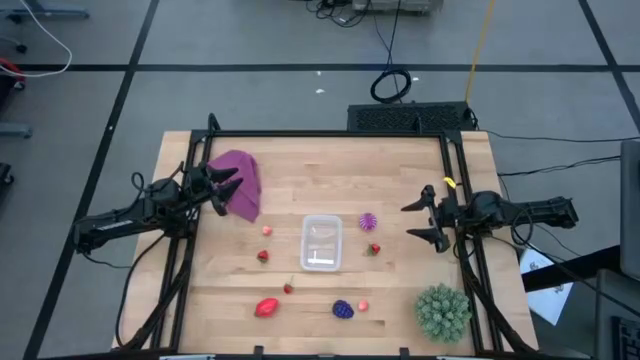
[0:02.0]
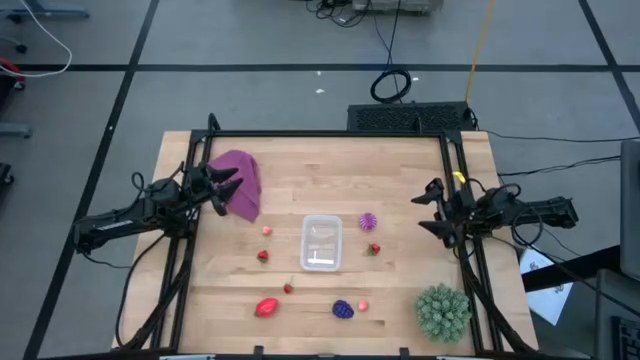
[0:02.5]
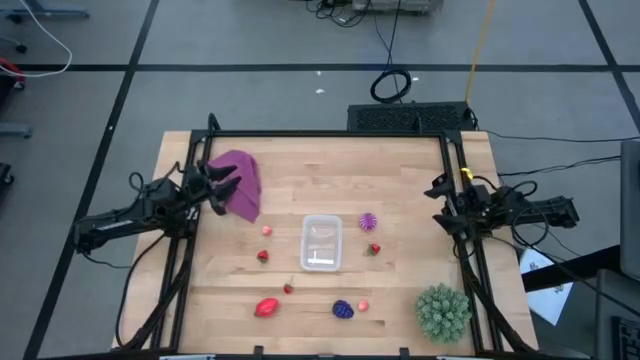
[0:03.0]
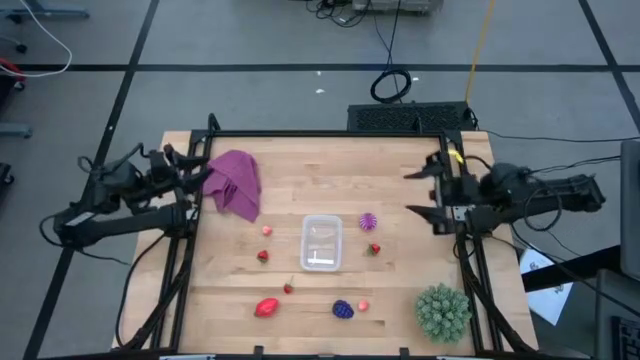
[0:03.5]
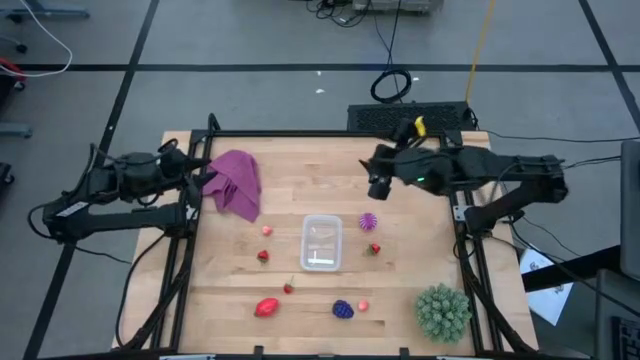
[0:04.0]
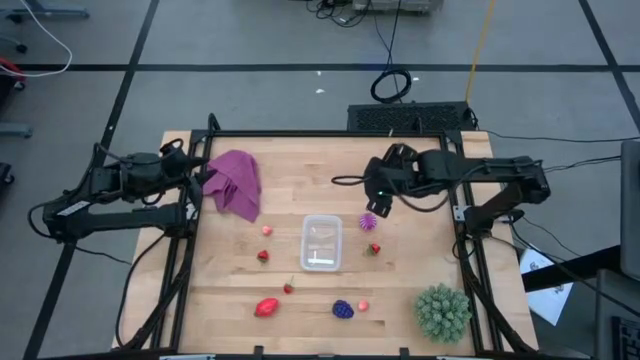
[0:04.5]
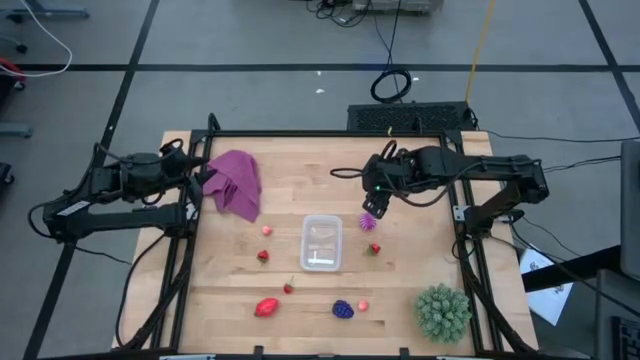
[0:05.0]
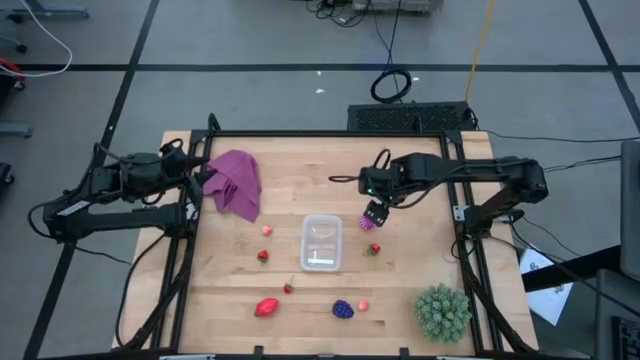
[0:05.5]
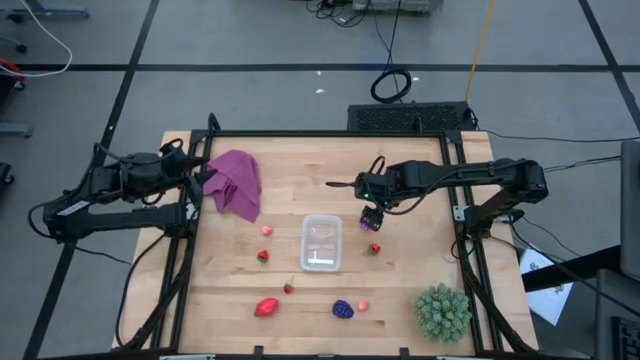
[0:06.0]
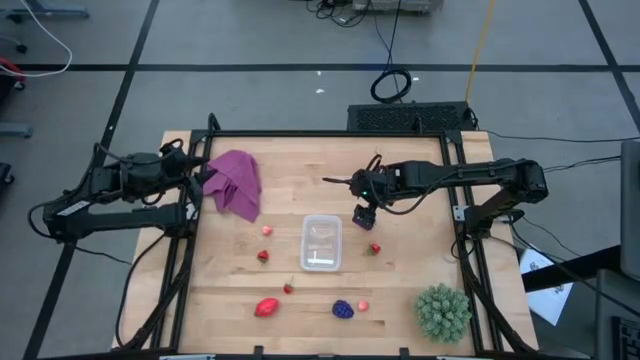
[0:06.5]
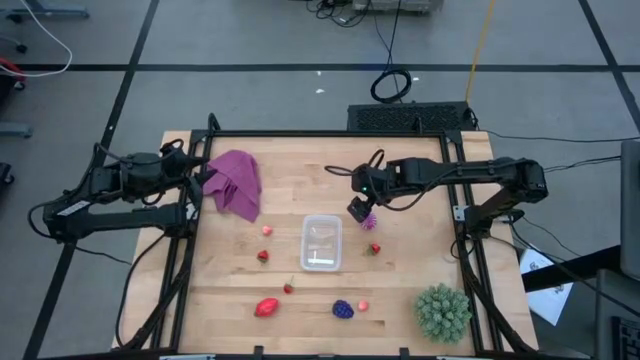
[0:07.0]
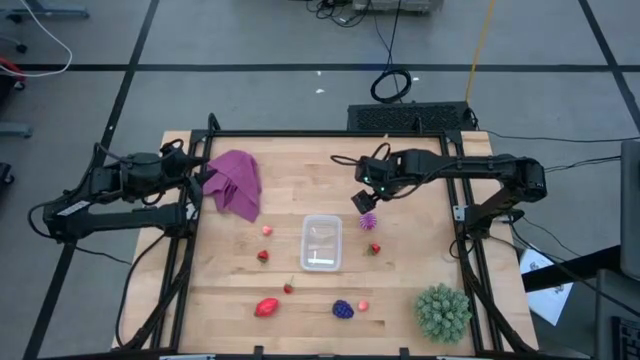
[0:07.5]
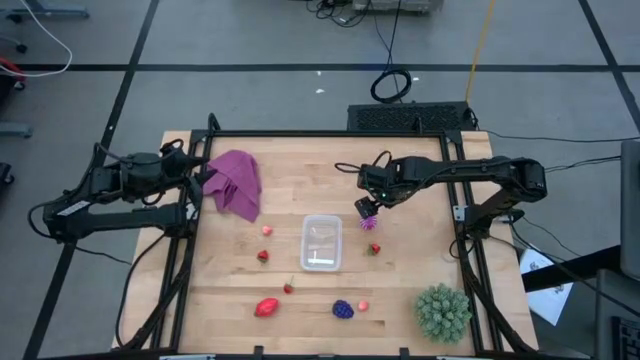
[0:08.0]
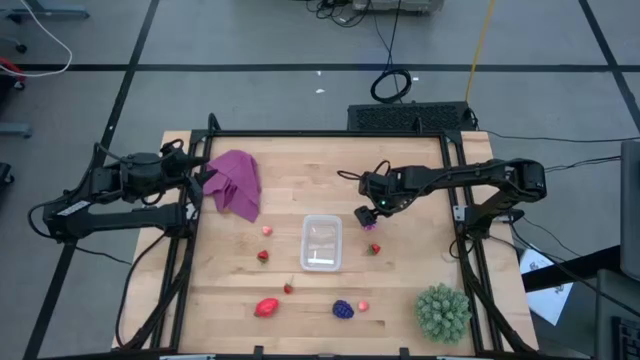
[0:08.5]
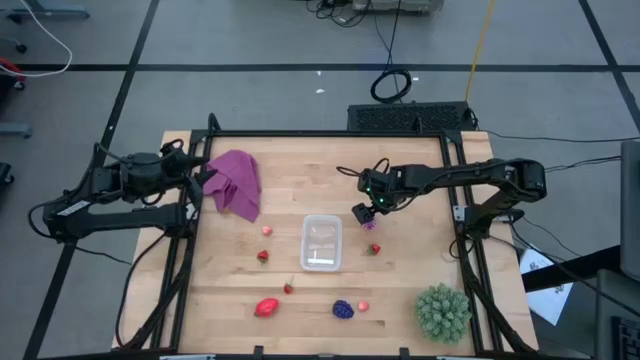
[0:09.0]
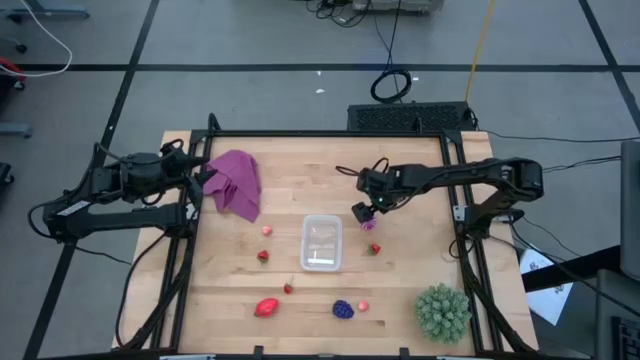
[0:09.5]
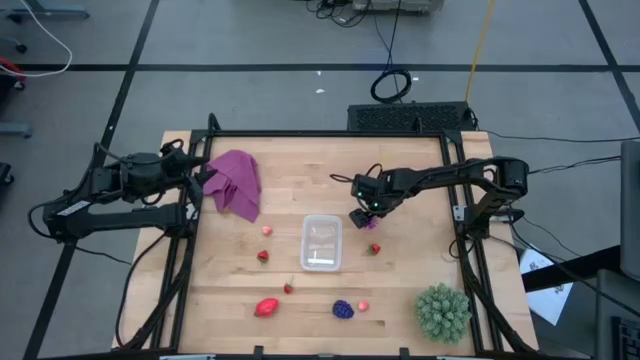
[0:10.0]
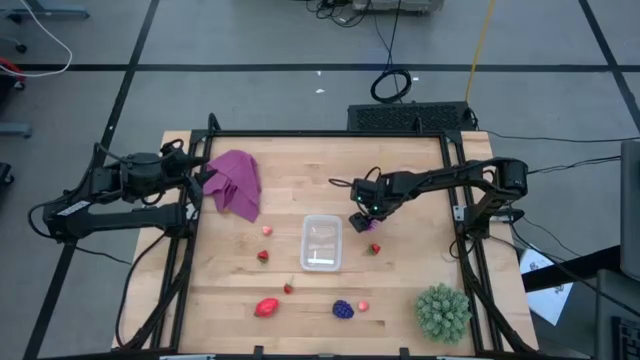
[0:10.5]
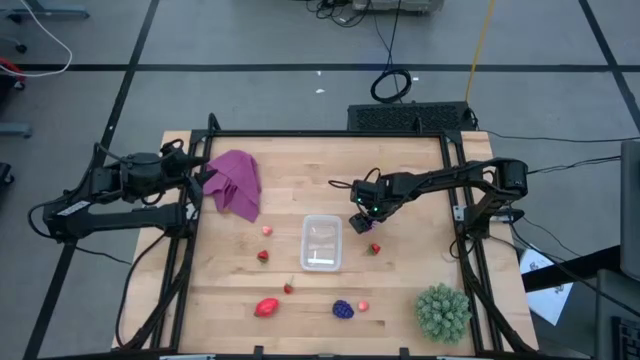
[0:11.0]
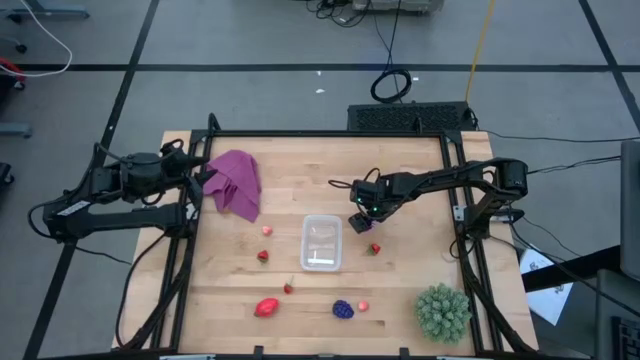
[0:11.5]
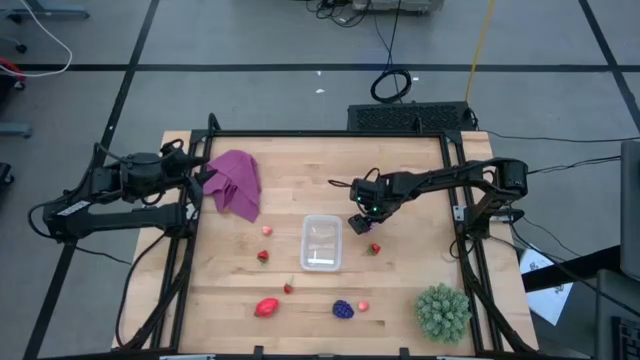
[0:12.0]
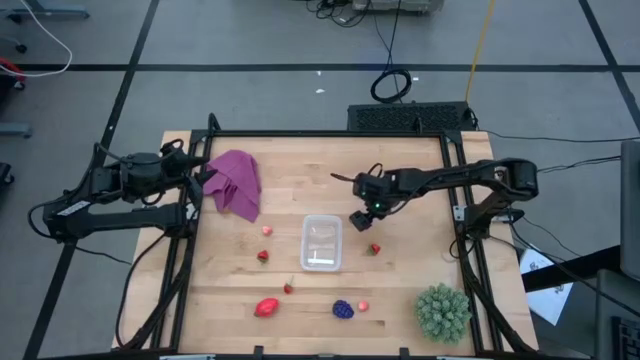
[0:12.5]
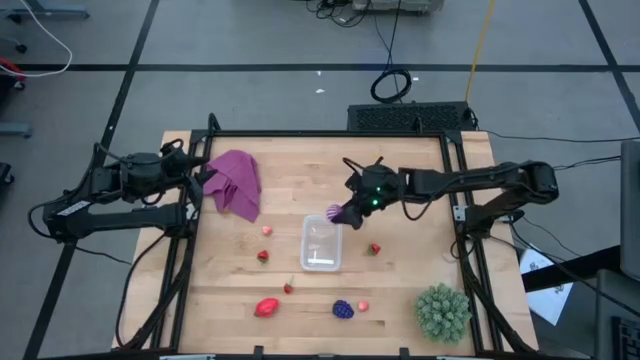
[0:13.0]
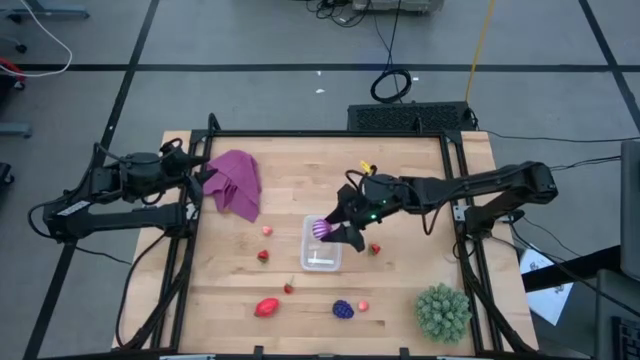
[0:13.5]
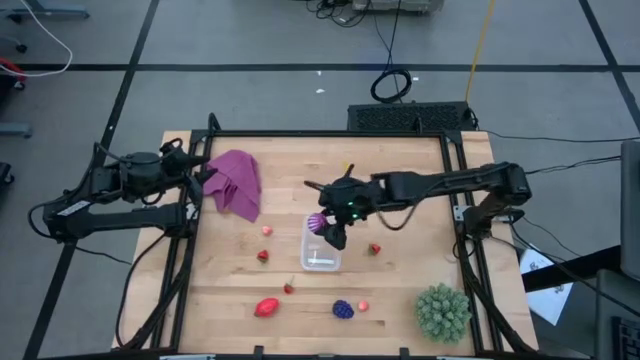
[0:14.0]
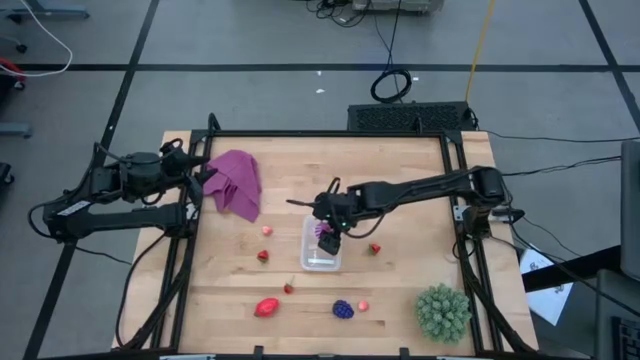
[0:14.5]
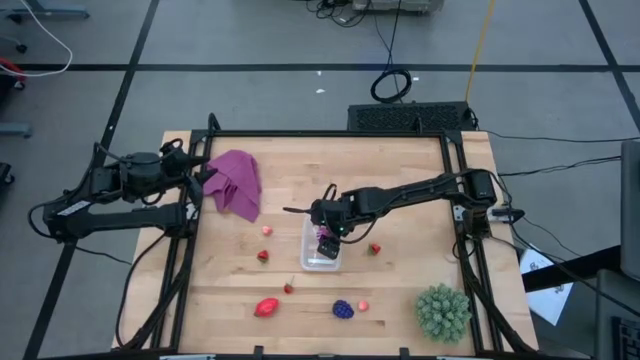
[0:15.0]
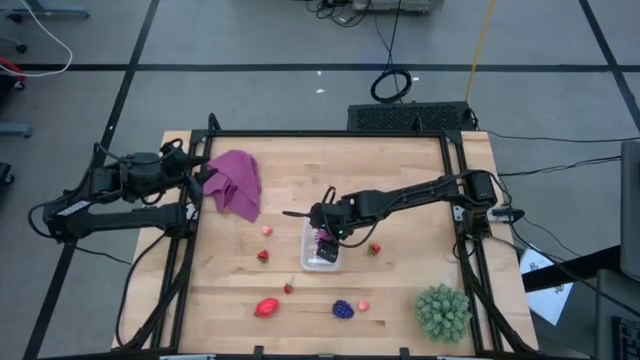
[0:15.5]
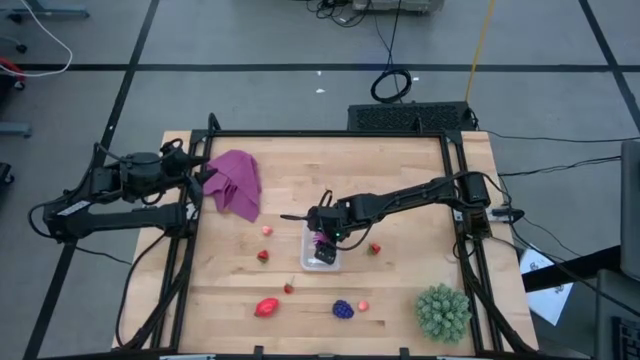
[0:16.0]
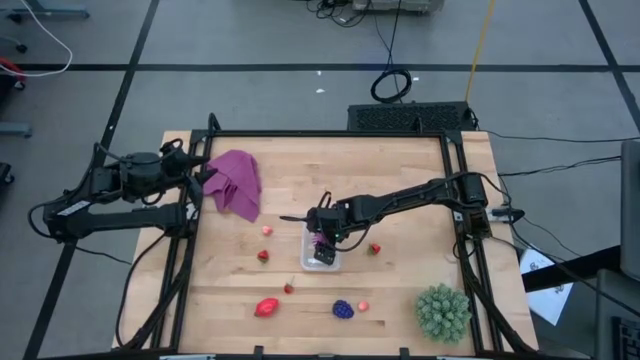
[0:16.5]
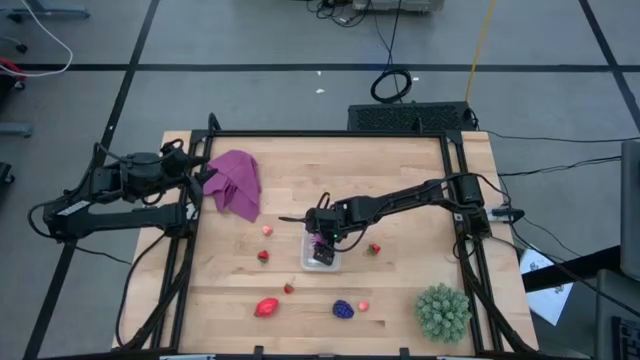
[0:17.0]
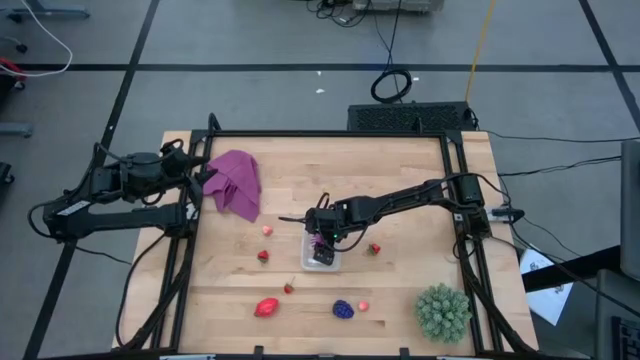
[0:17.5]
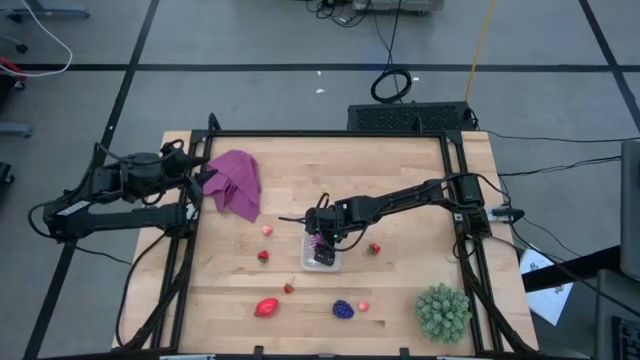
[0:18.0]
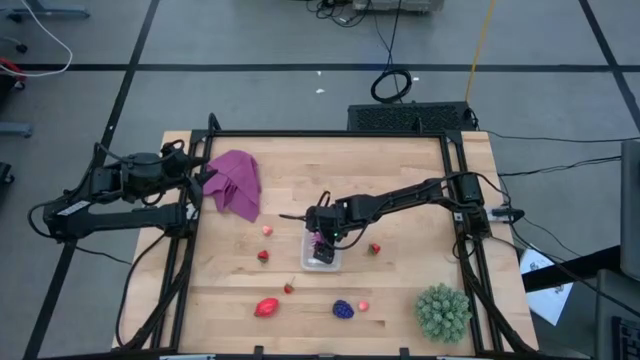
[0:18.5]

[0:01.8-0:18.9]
Task: Pick and placing Produce into tupperware
Put the onion into the transparent bin
